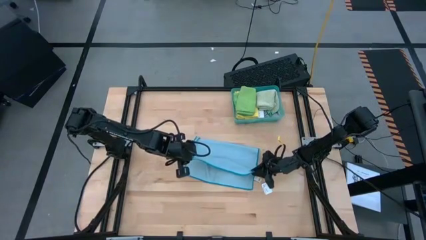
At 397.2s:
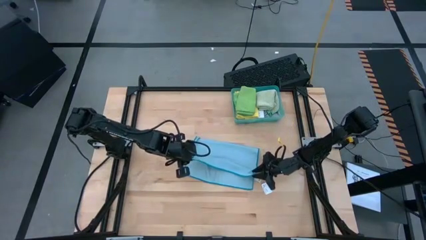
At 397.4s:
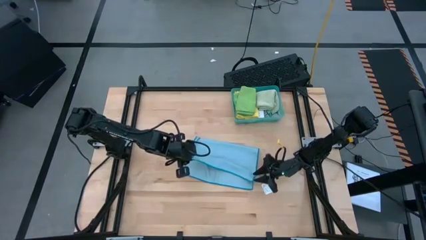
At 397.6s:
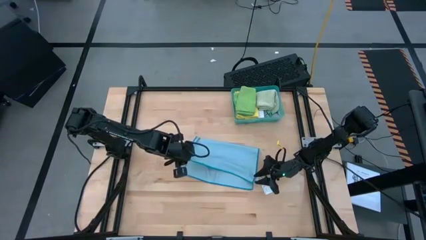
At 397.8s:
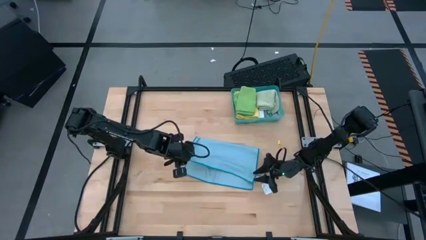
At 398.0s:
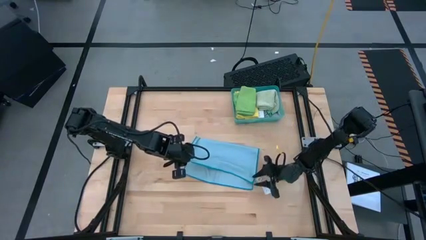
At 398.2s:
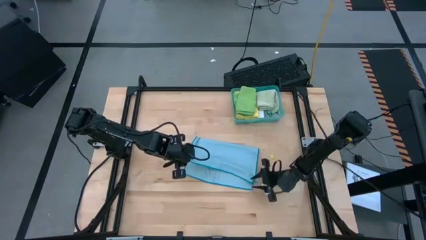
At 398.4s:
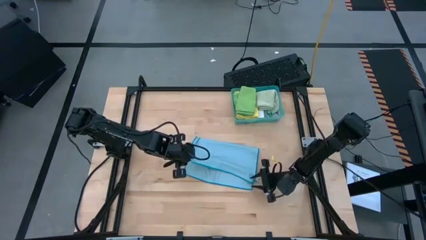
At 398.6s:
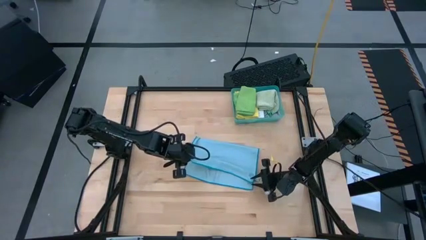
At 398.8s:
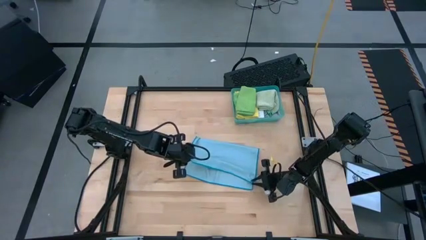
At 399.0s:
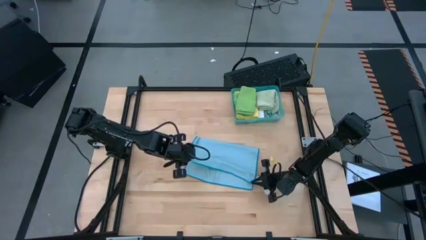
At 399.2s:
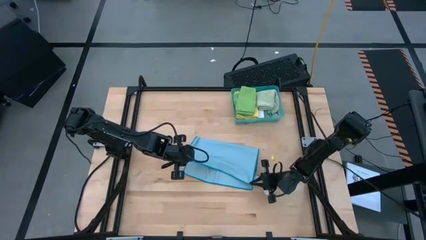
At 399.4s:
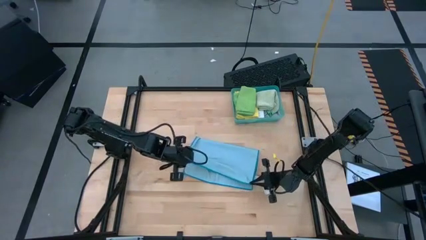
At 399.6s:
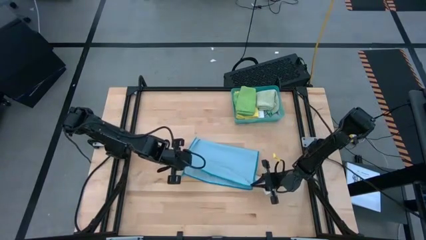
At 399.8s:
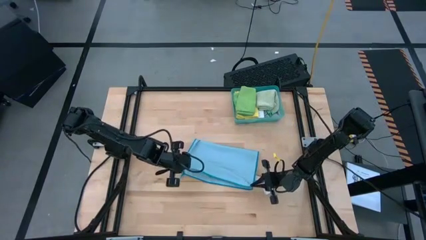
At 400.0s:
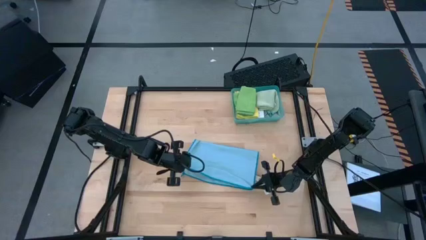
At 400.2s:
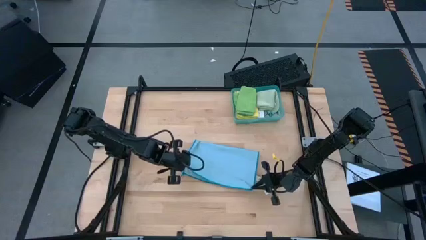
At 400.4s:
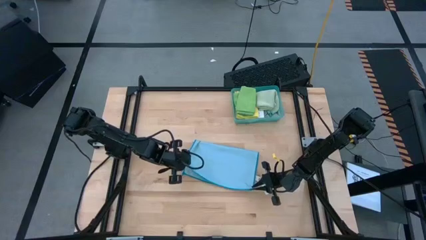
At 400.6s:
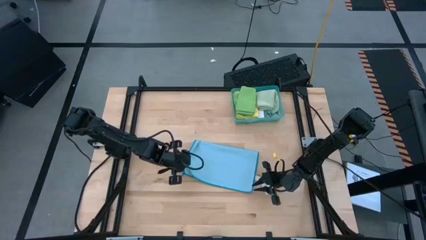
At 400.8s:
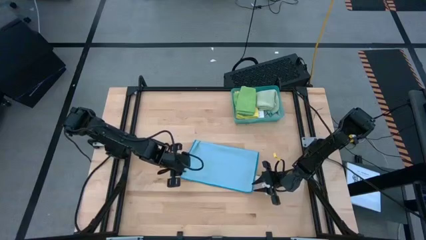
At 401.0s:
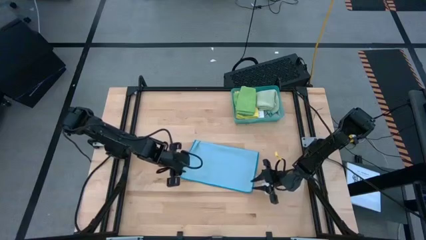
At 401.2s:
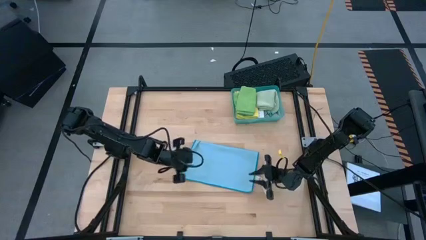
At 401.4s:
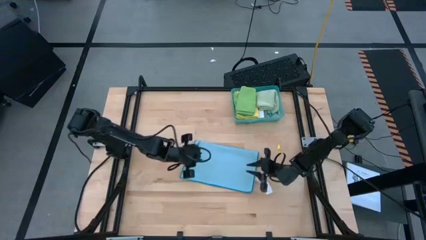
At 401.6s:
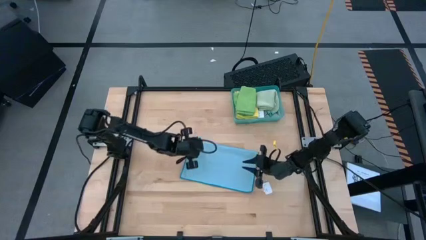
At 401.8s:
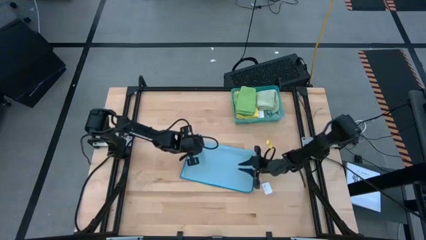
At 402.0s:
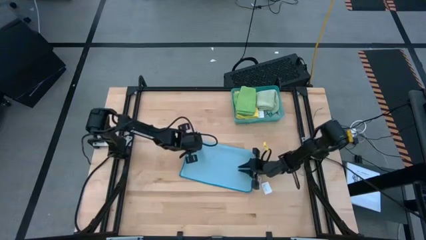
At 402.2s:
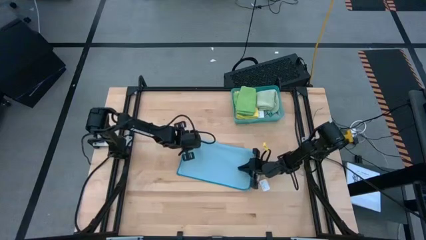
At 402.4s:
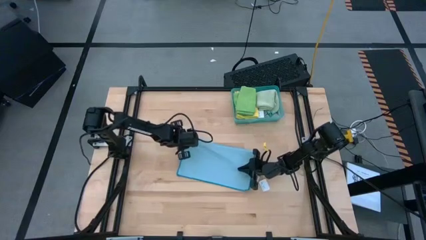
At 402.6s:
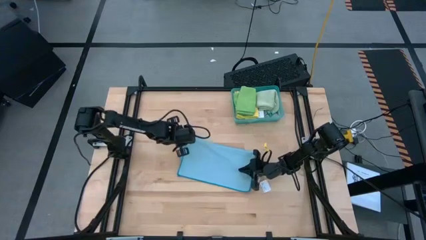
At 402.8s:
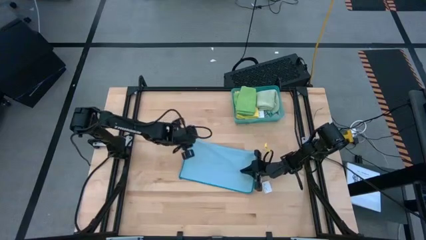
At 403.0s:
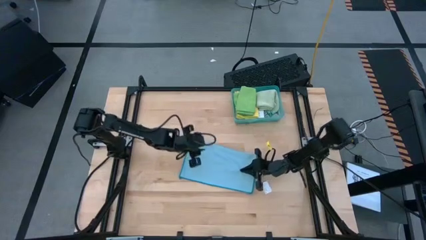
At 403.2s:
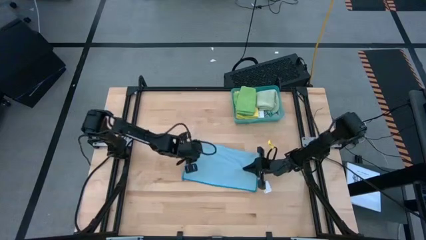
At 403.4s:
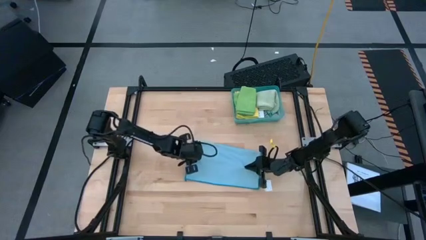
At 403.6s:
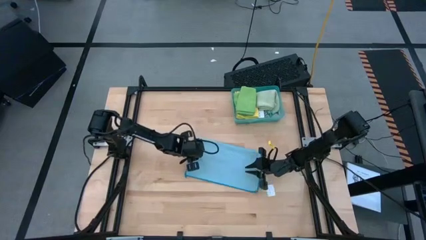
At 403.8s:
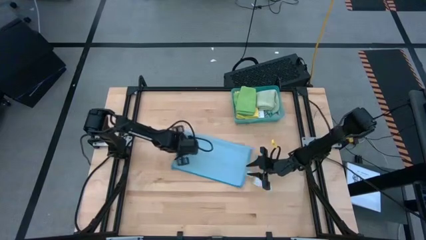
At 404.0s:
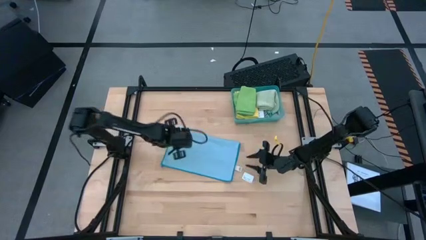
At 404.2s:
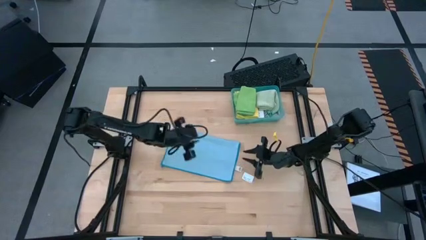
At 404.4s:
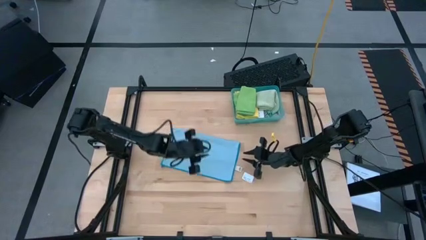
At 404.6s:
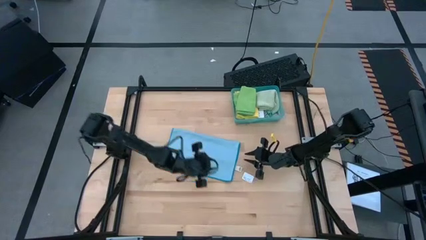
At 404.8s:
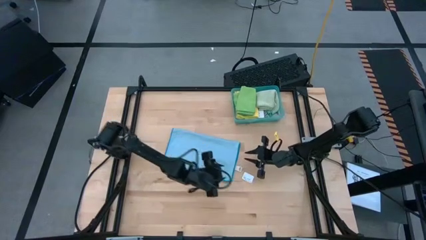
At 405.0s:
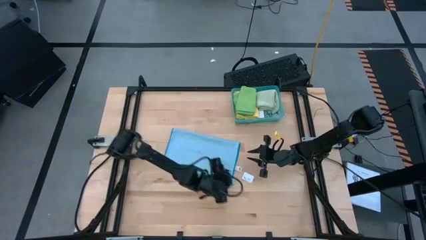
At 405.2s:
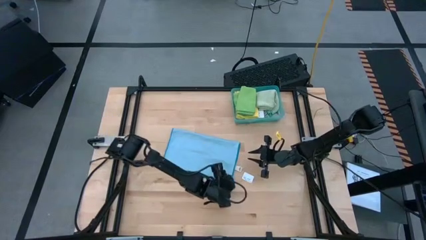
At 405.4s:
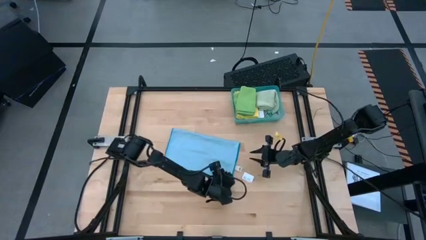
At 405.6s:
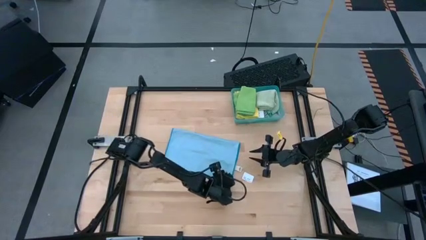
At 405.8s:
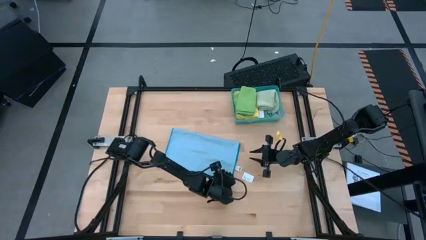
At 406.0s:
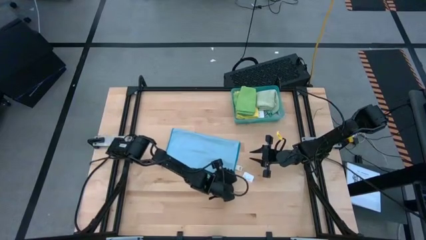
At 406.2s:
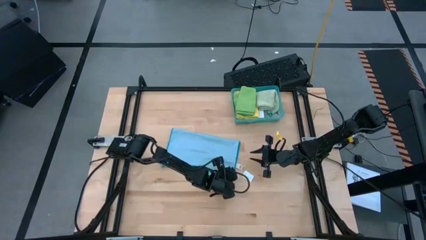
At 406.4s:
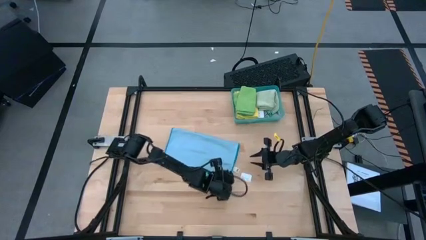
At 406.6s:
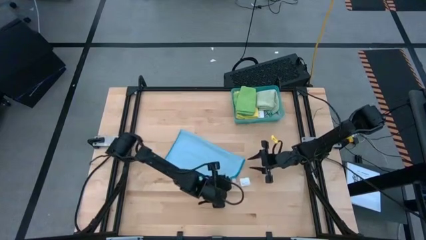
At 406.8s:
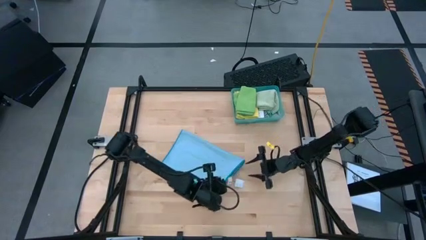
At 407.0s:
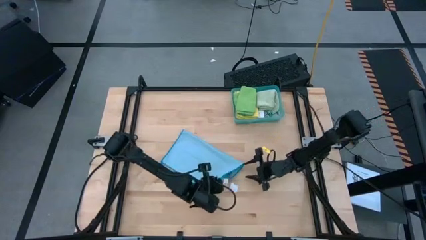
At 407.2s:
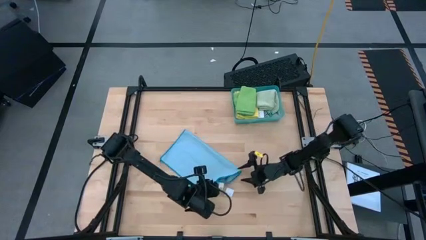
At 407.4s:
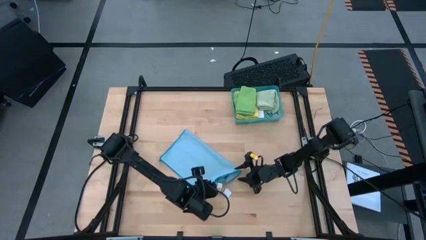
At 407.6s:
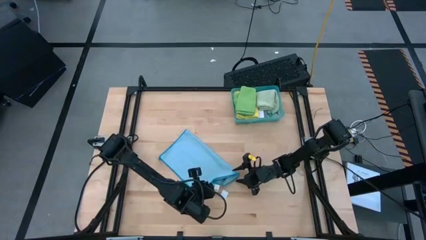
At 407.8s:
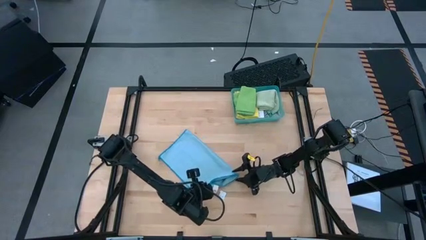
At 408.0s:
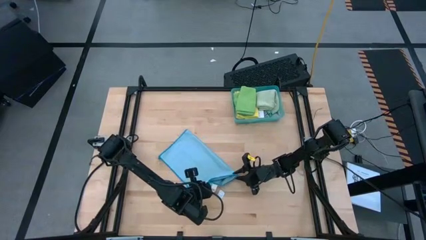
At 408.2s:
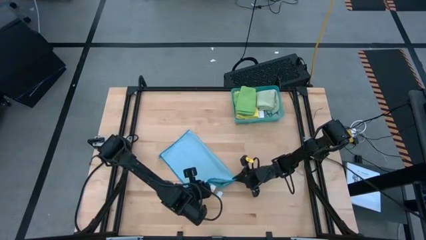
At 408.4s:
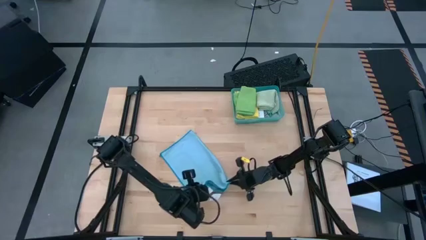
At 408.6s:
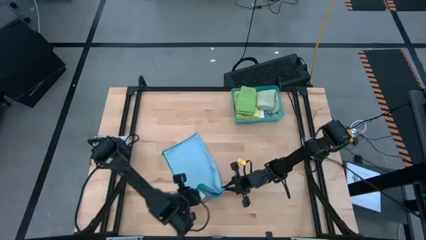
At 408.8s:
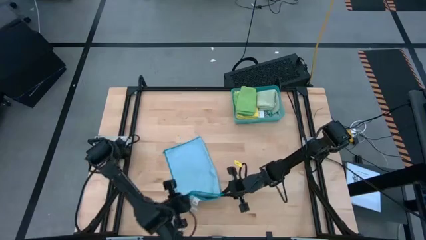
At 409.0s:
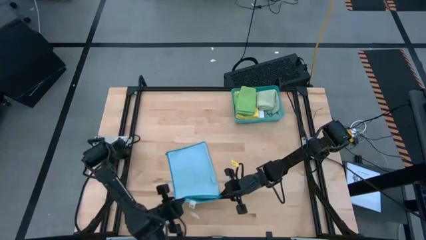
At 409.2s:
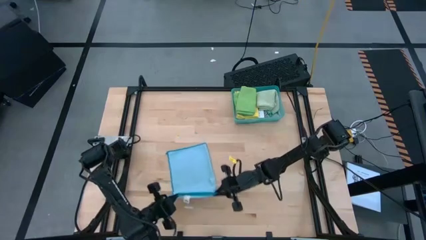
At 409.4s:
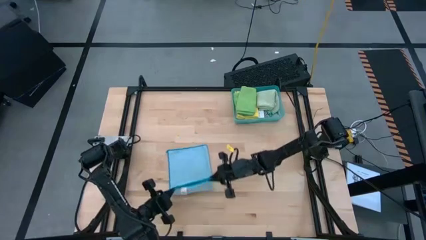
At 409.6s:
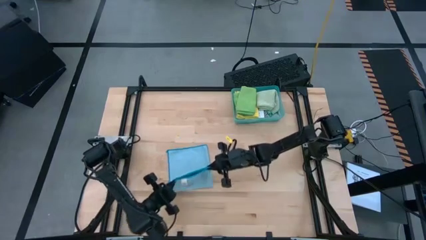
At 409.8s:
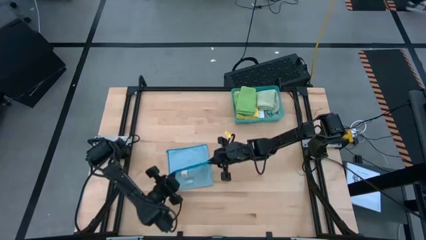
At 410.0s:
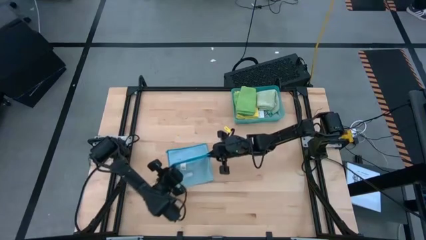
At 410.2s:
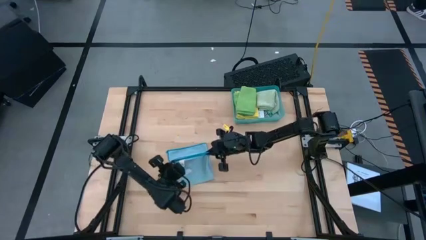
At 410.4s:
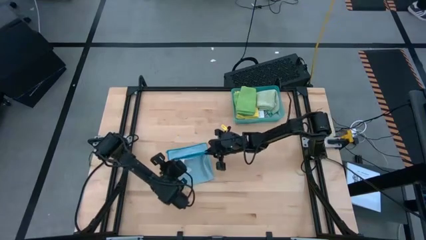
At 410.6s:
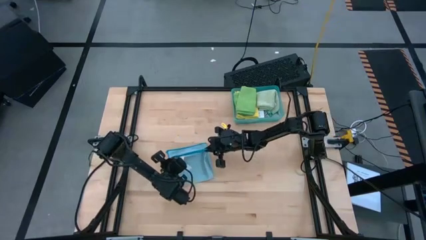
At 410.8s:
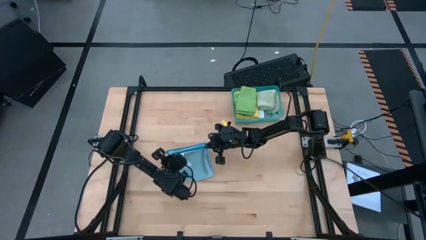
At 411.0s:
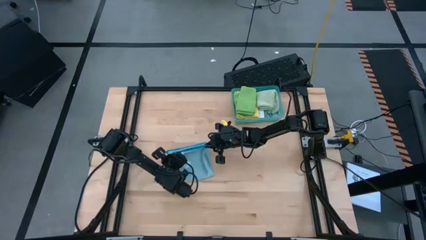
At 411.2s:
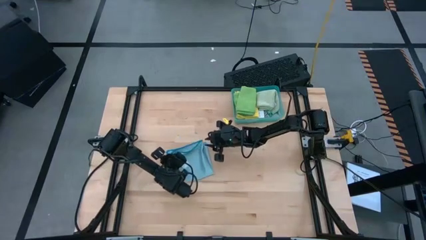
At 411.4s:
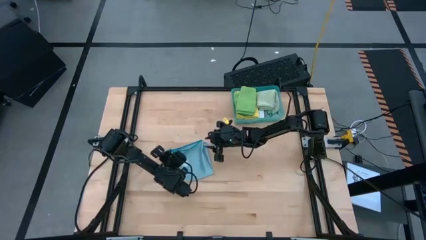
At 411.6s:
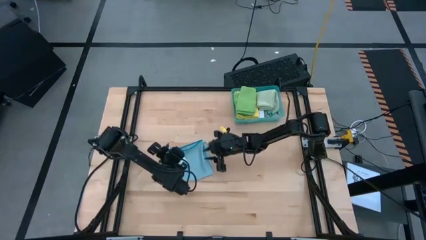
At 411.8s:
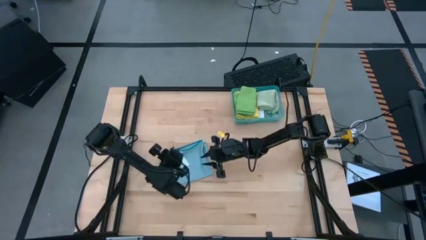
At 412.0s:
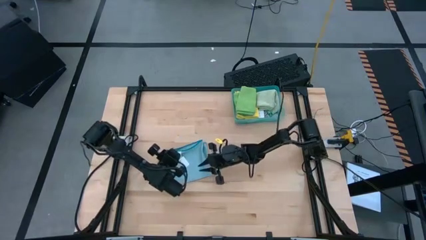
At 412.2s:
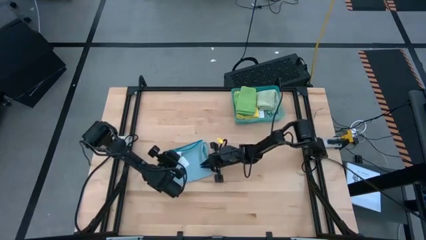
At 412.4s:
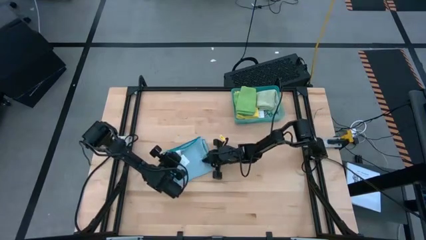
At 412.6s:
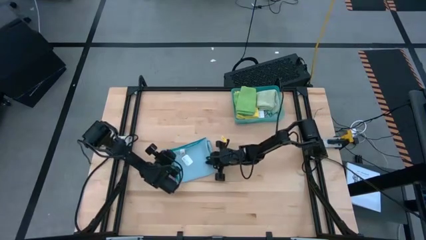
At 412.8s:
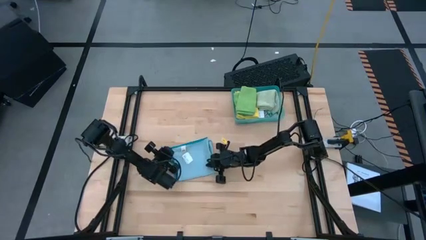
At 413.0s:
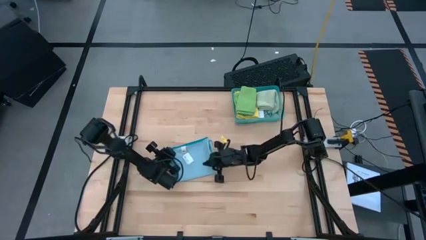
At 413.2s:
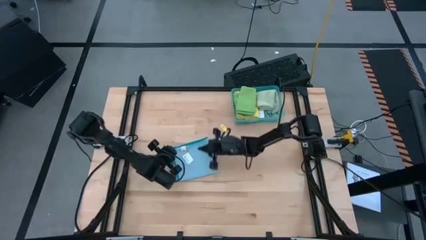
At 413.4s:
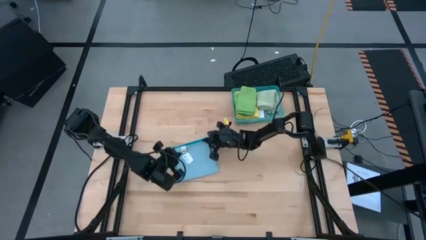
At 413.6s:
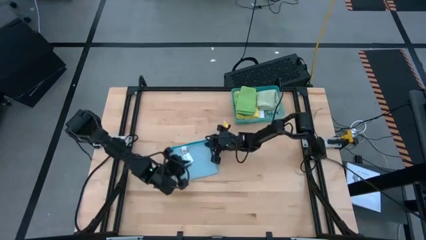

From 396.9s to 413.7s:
Task: Fold microfiber towels
Fold the blue microfiber cloth
